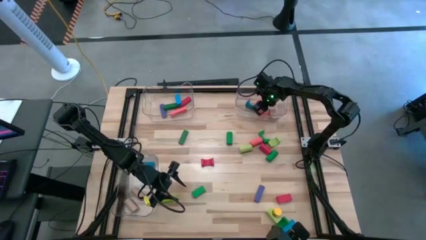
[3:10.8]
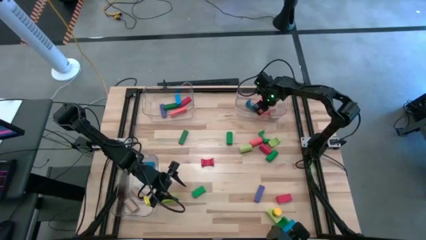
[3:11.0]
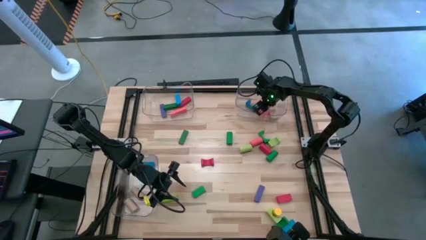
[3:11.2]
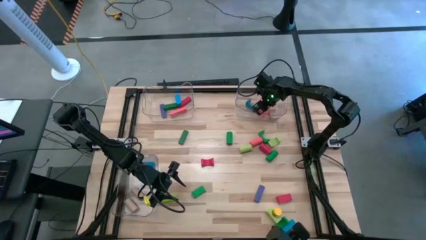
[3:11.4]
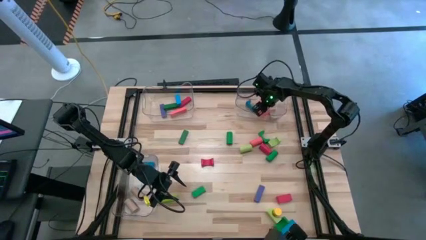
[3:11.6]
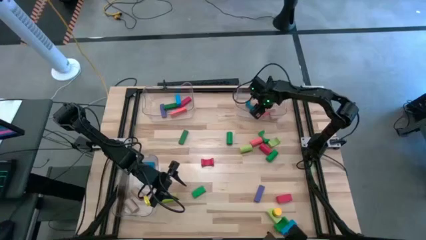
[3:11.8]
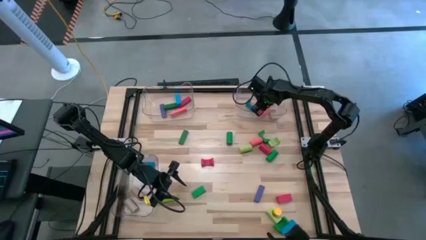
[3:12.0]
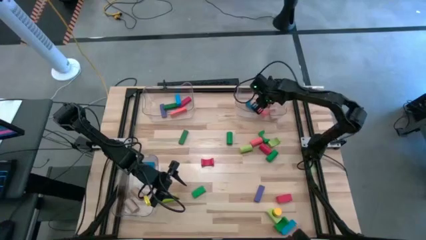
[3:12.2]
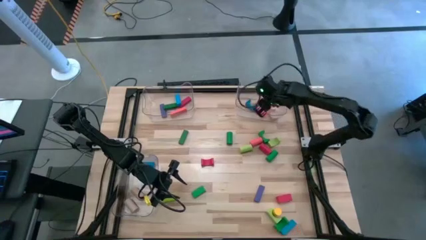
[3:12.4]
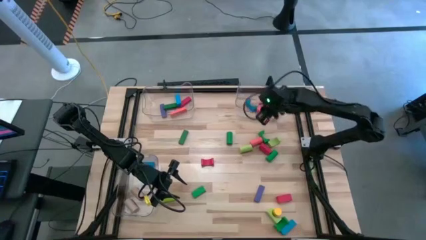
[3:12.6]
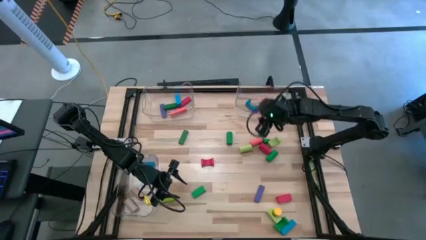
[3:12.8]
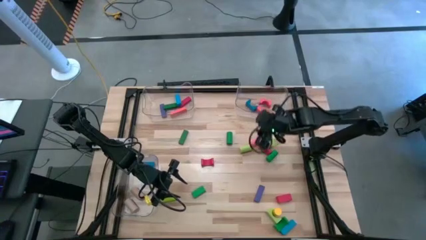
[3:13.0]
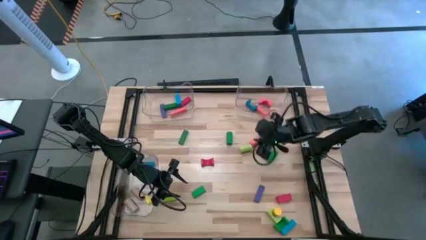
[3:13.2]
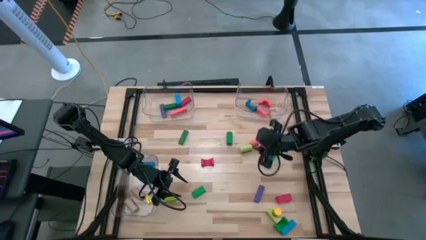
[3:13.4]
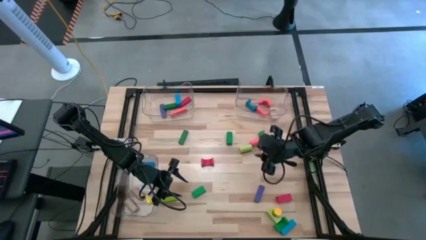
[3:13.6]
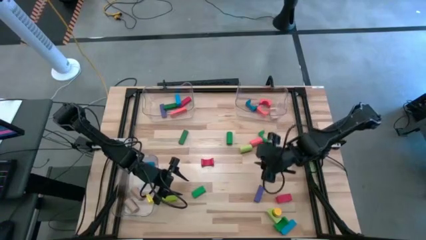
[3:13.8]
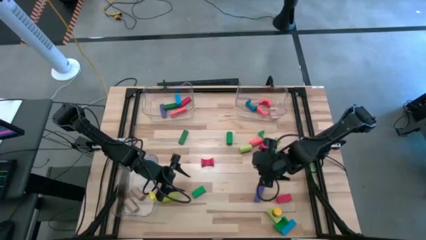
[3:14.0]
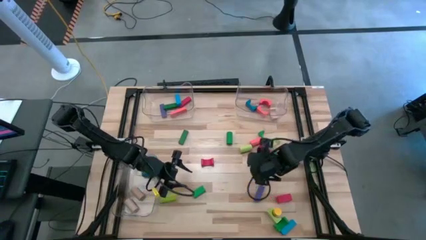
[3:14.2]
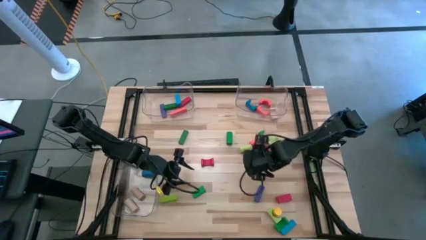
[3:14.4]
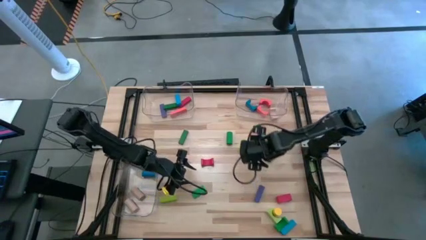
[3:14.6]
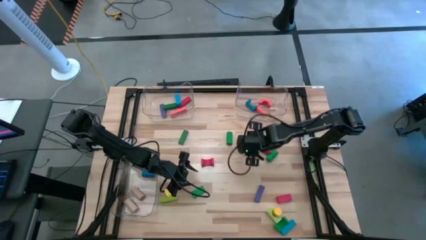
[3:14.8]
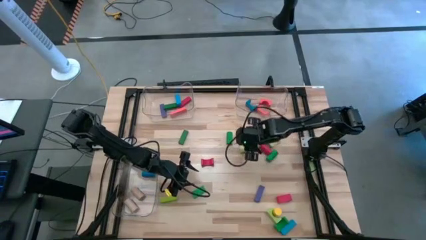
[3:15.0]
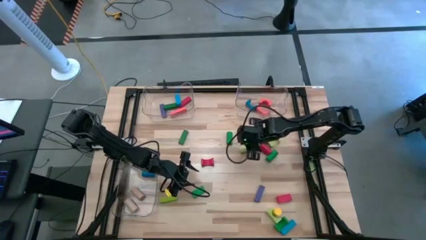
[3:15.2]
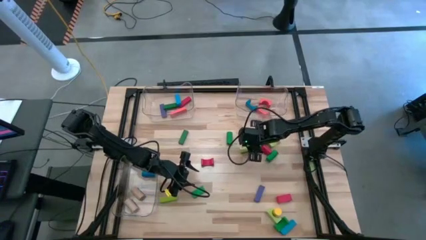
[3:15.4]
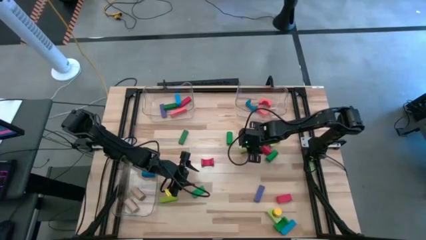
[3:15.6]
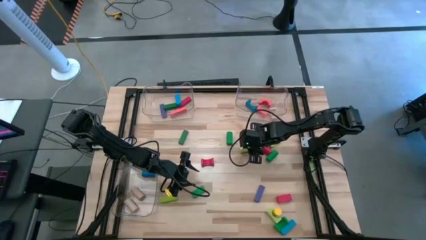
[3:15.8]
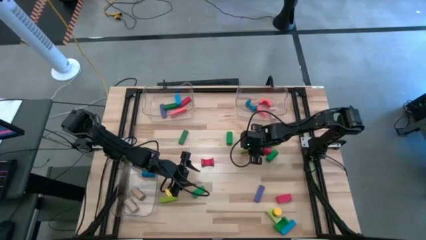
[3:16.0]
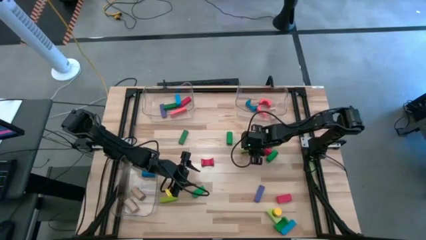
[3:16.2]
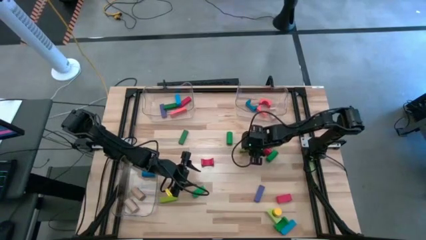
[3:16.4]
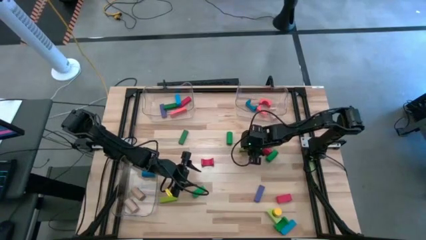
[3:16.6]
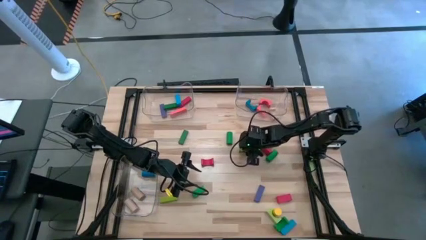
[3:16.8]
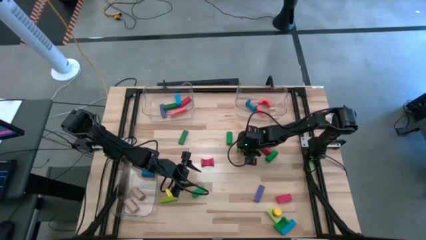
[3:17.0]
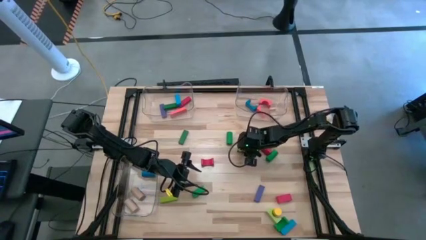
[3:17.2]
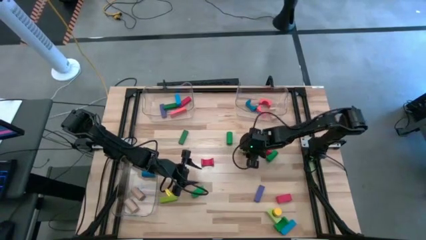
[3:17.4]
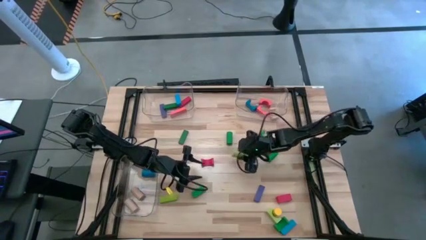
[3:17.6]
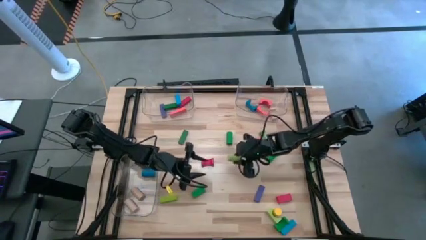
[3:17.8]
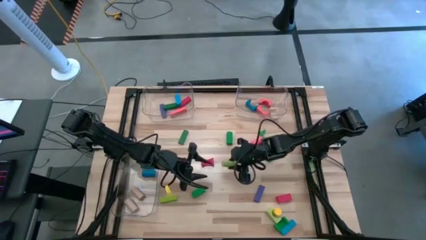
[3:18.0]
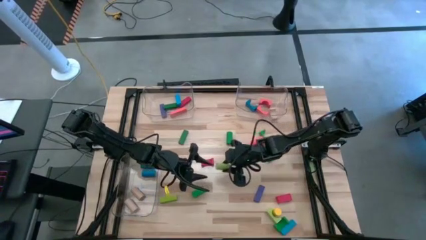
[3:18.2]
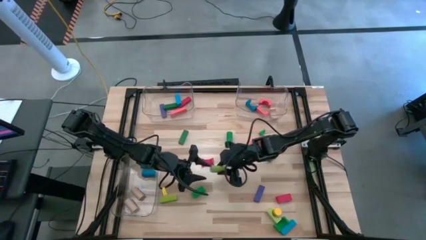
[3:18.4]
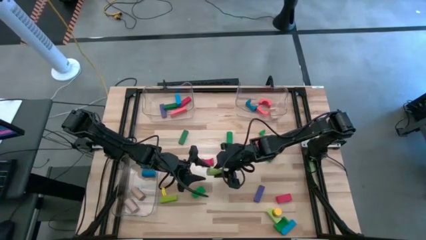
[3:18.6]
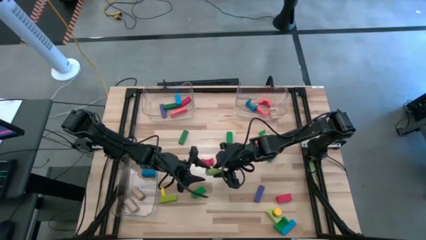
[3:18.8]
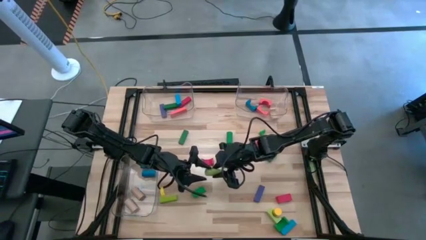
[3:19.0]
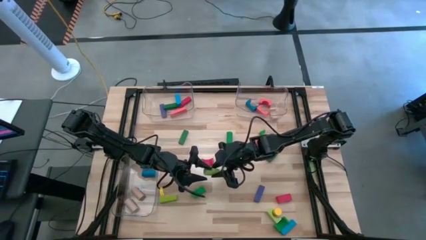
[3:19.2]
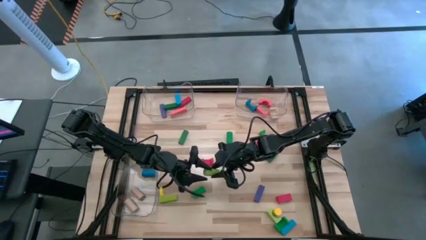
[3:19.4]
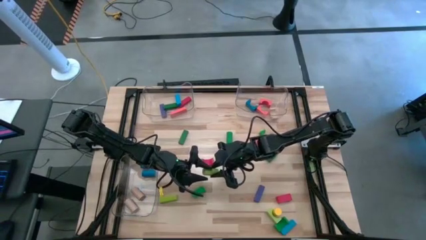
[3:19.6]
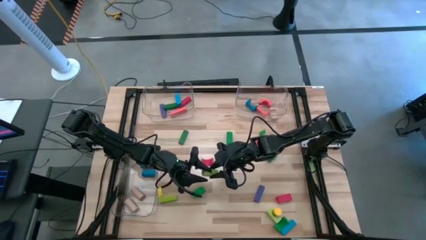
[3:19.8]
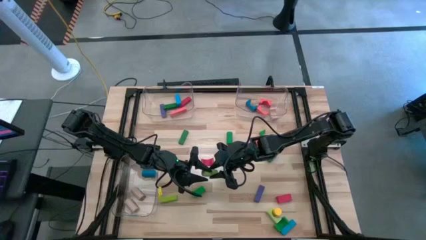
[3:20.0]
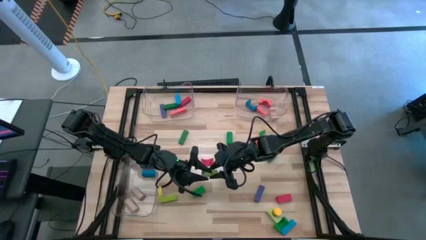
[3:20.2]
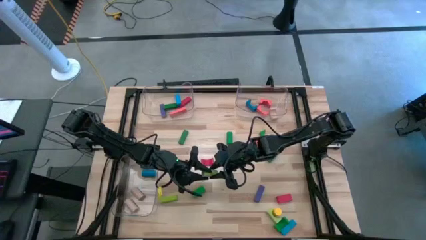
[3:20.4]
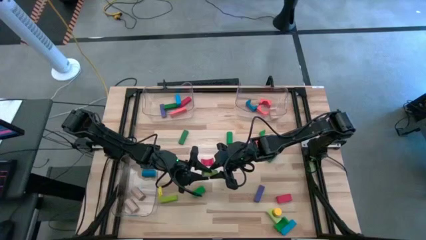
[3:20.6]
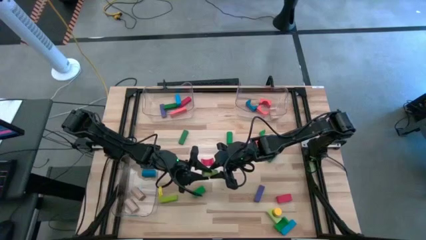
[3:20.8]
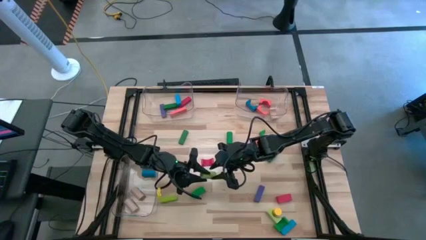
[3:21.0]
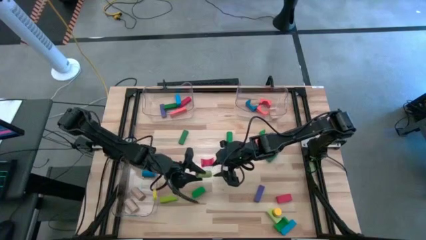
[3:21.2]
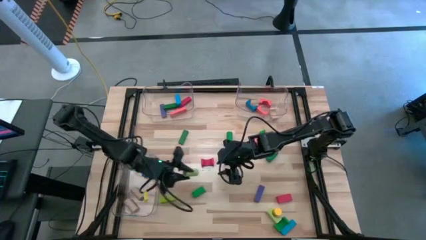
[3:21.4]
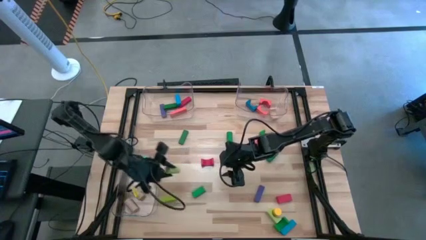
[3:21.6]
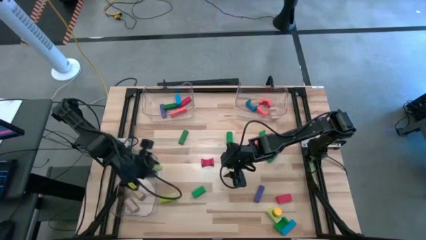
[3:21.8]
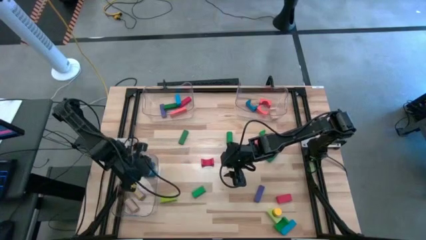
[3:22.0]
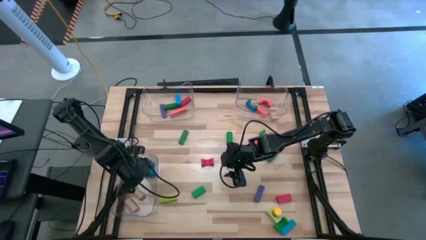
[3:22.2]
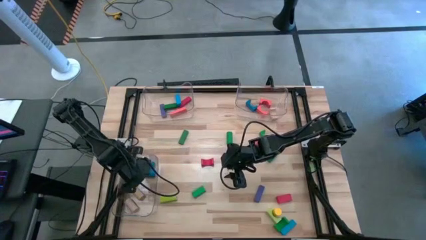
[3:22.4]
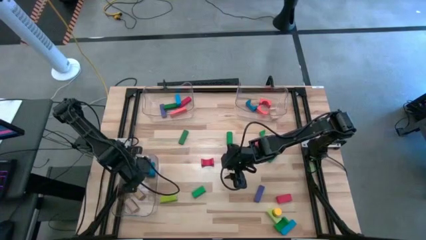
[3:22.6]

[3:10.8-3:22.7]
Task: Sort blocks by size
Put the light green cylindrical block into the bottom left transparent bin

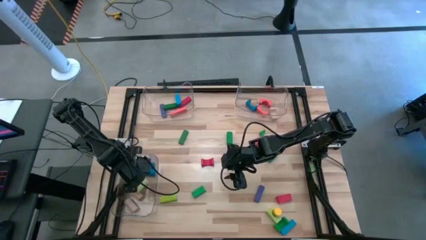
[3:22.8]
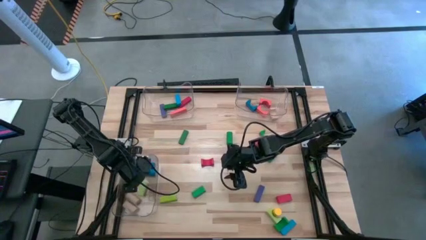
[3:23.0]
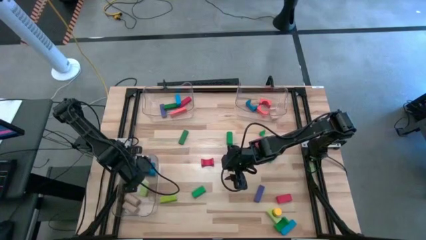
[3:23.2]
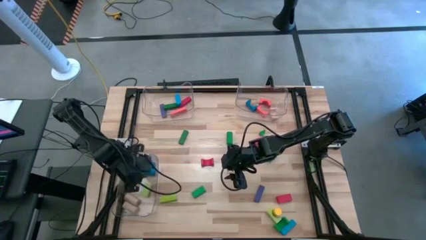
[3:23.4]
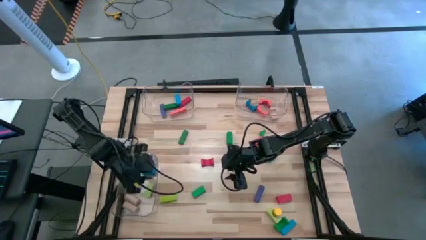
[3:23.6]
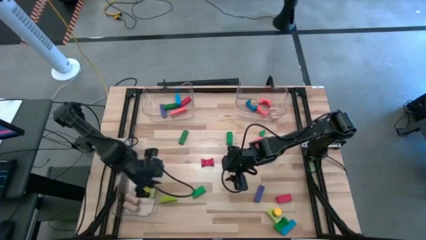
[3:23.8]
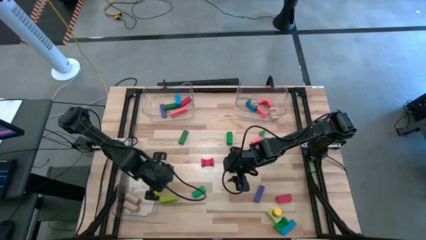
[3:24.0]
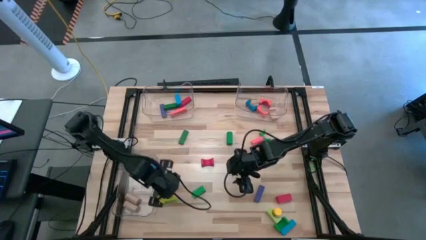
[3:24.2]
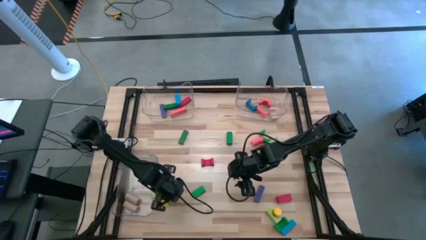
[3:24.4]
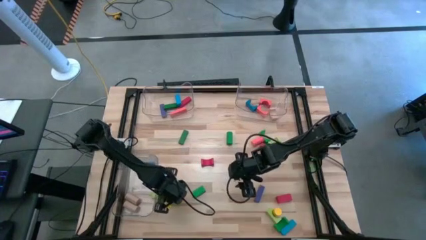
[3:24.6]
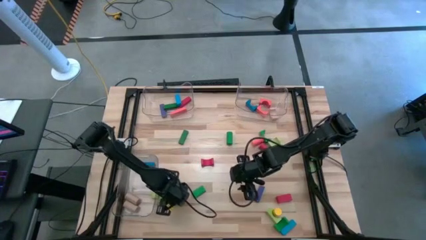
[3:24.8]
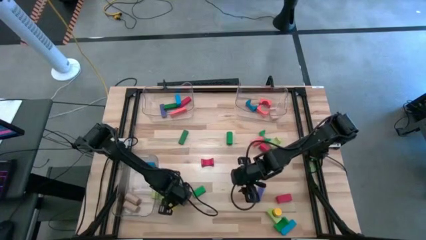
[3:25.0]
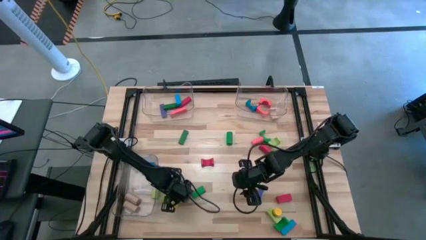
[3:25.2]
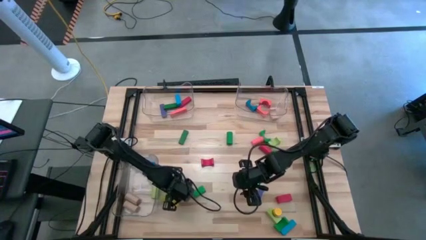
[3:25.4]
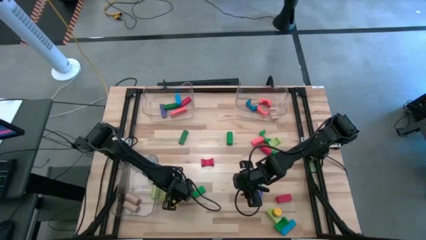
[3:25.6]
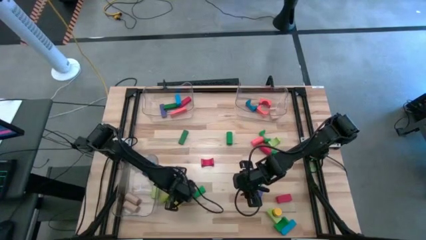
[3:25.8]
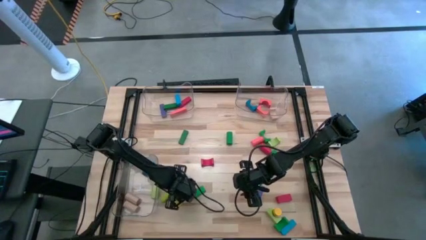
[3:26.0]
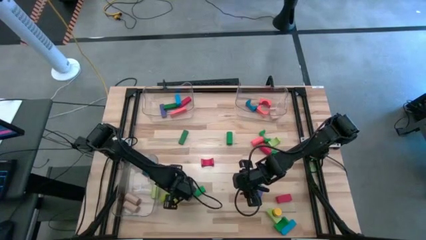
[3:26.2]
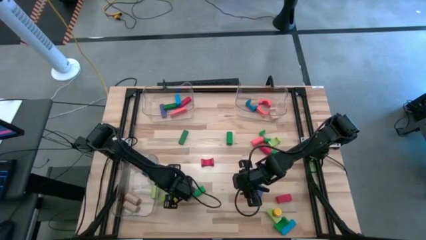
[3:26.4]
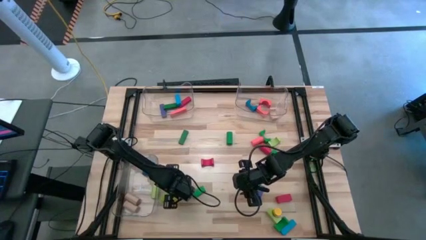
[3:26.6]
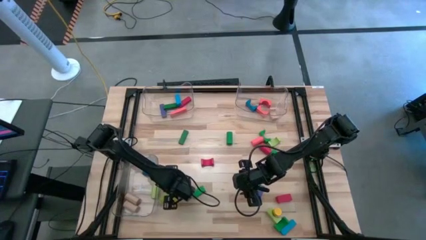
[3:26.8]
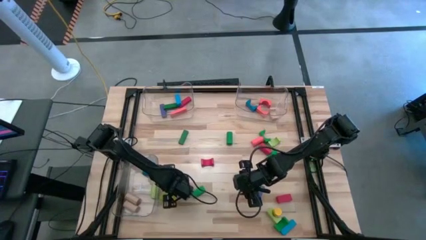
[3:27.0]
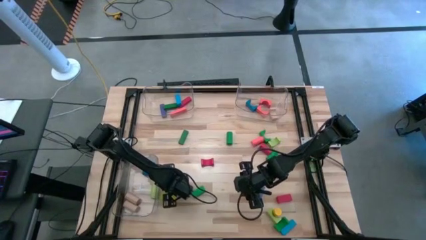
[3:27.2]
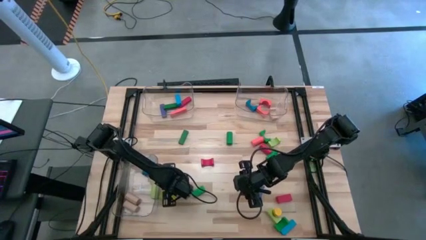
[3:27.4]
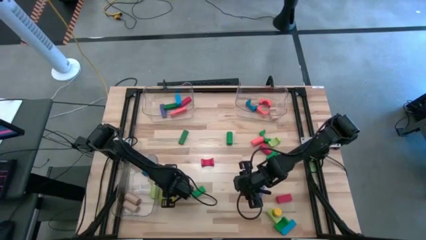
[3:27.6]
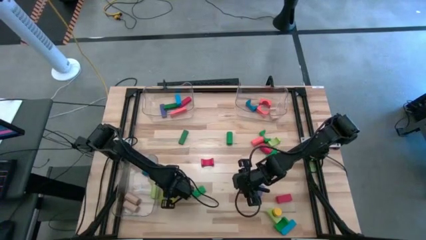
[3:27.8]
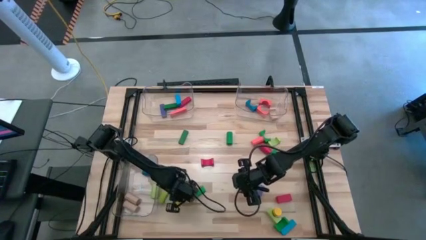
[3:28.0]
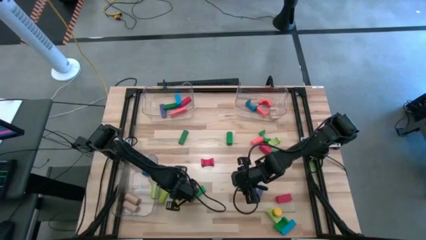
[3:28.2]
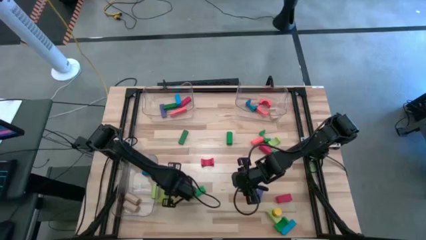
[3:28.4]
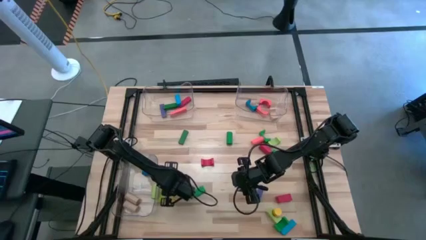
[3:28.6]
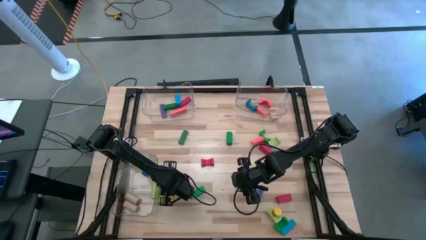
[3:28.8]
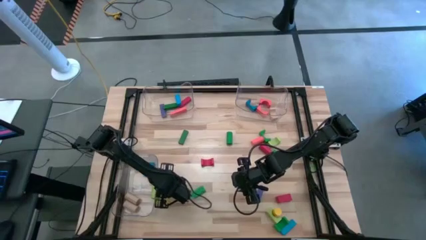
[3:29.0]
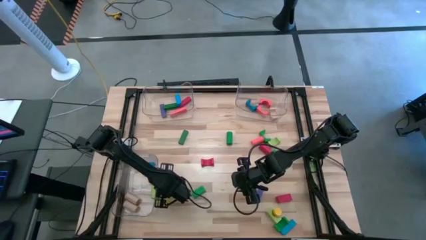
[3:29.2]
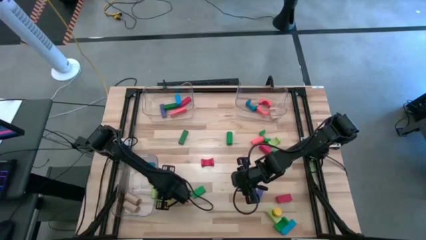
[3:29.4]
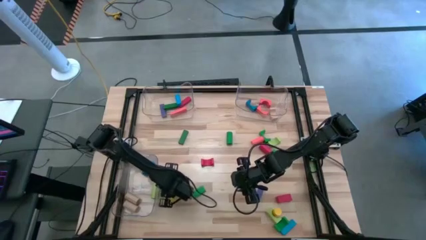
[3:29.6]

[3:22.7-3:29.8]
Put the light green rectangular block into the top left transparent bin
